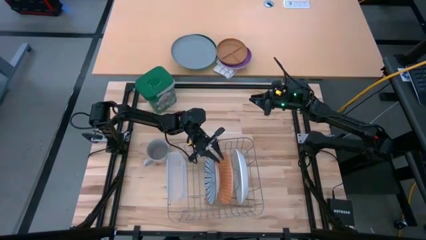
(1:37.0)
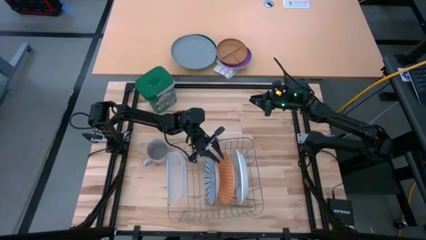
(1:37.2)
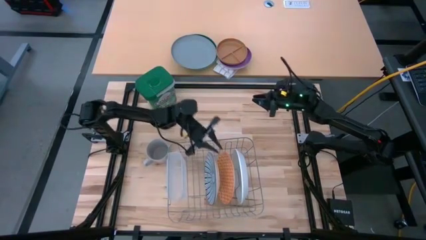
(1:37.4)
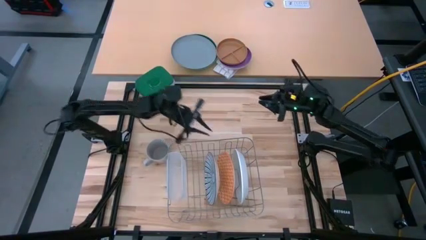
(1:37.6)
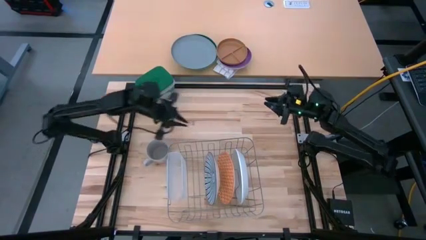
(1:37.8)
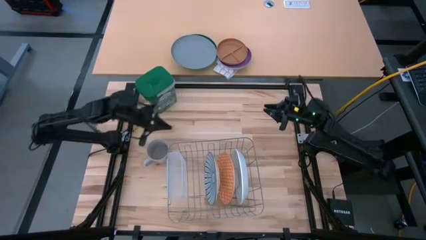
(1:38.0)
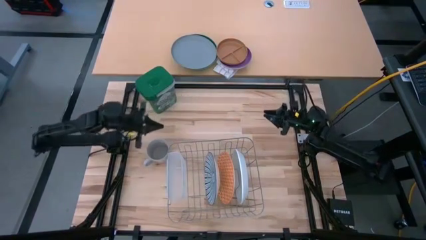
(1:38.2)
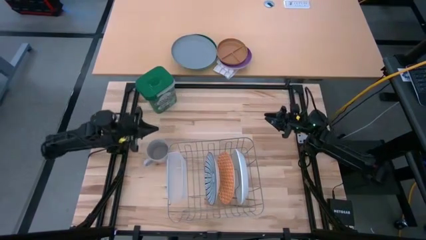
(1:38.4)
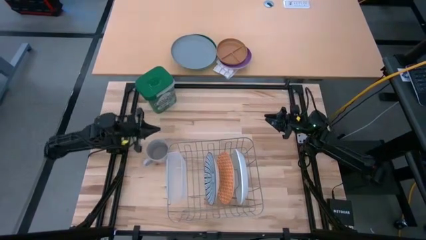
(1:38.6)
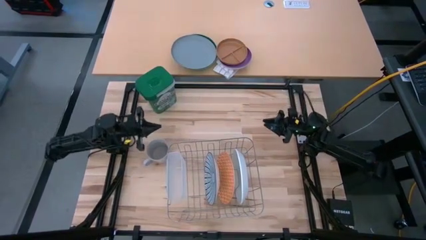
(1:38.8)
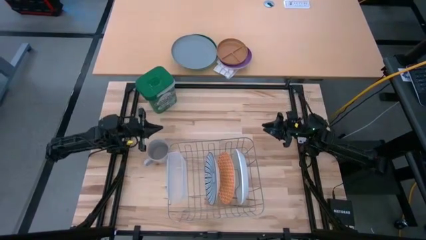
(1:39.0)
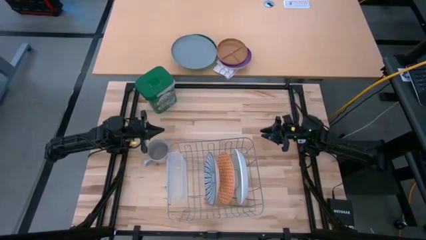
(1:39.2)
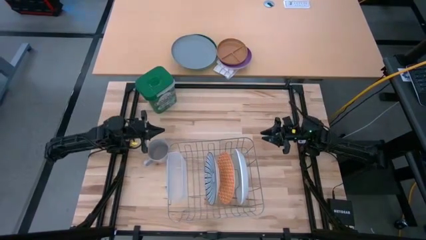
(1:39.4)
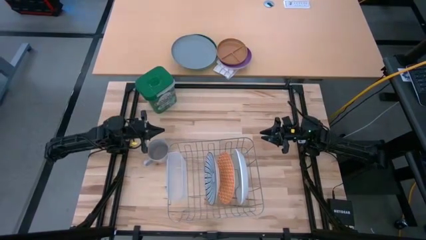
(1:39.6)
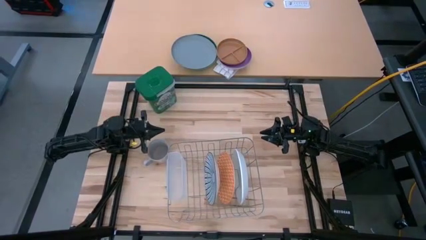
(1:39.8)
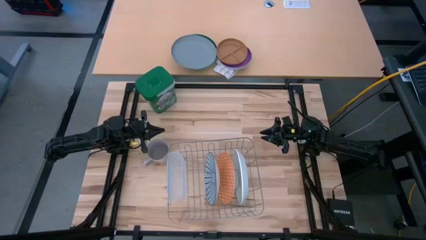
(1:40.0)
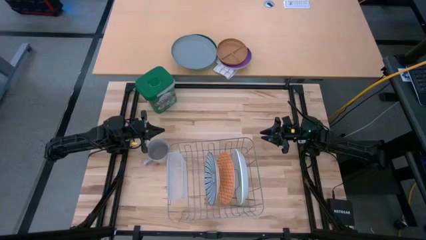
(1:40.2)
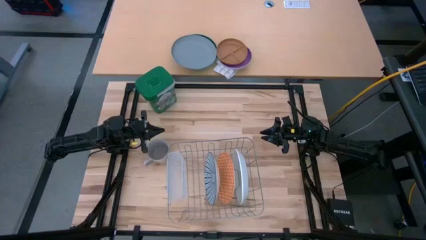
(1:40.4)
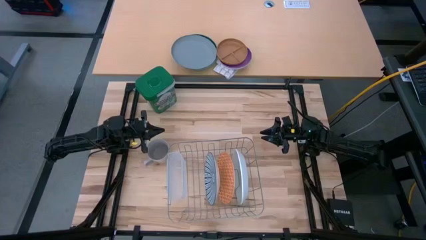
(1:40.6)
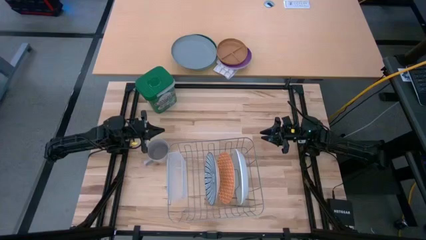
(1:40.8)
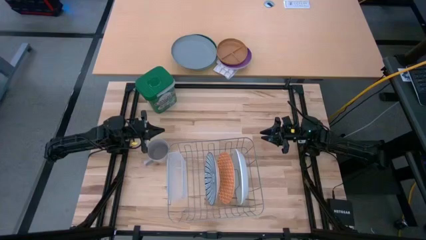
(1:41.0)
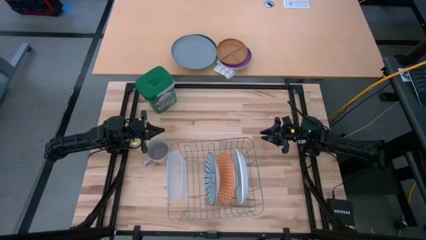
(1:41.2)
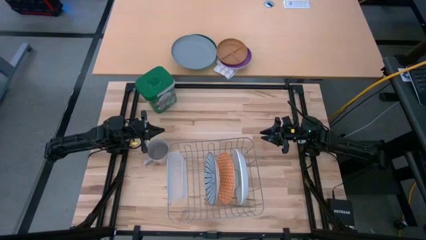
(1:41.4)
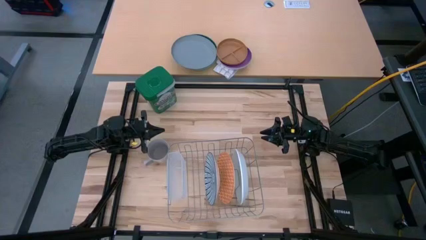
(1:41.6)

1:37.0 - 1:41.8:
Task: Sort dishes
Return to Home Position

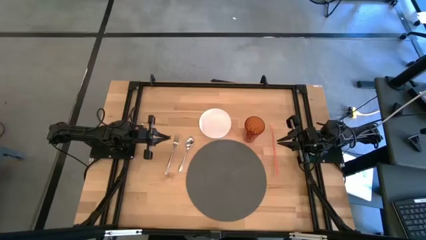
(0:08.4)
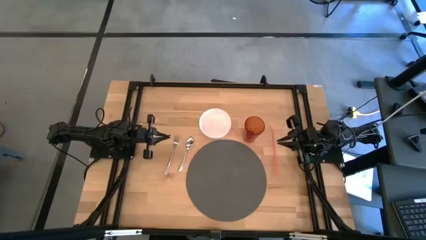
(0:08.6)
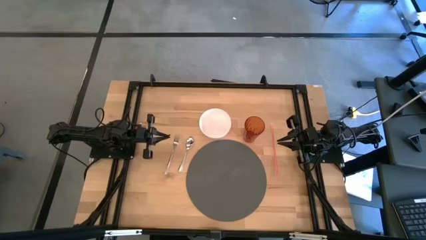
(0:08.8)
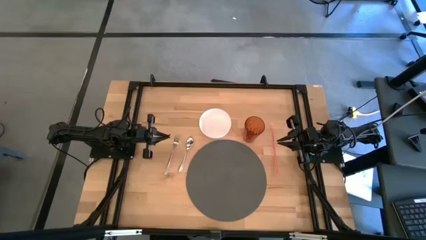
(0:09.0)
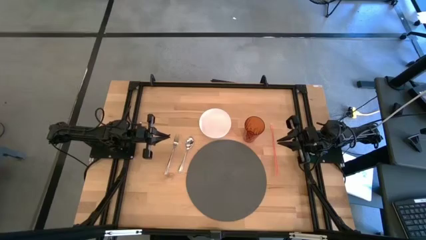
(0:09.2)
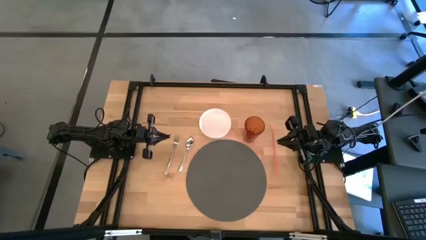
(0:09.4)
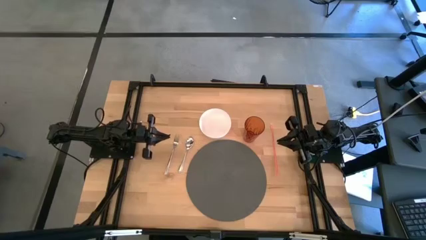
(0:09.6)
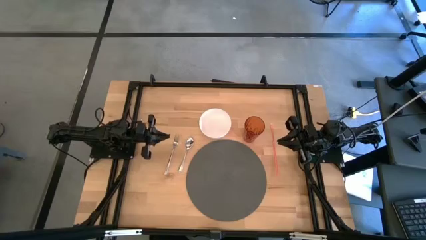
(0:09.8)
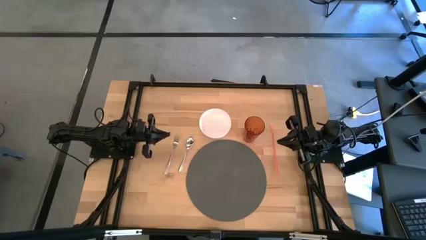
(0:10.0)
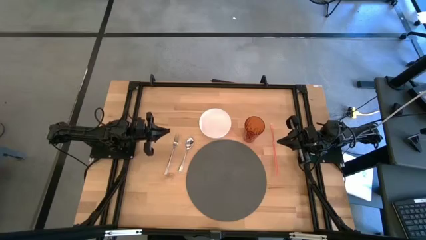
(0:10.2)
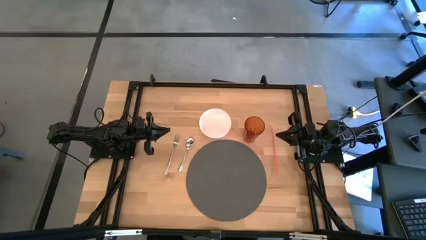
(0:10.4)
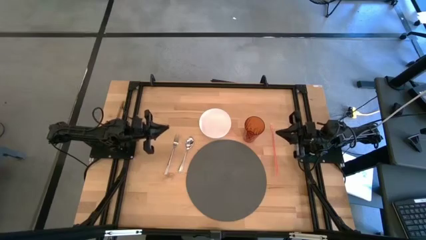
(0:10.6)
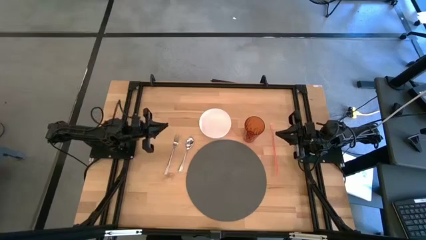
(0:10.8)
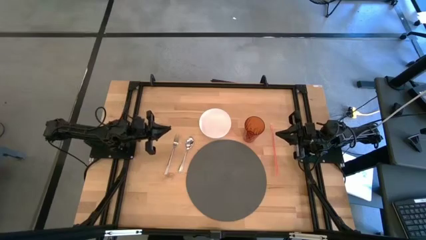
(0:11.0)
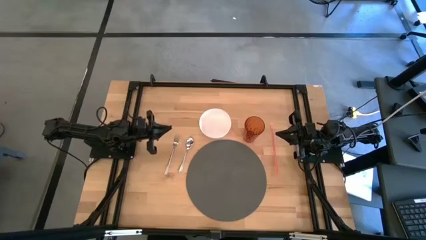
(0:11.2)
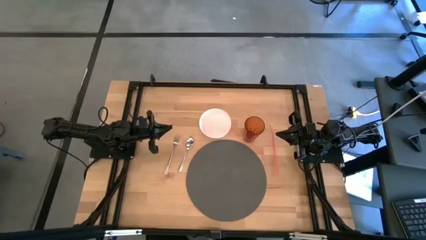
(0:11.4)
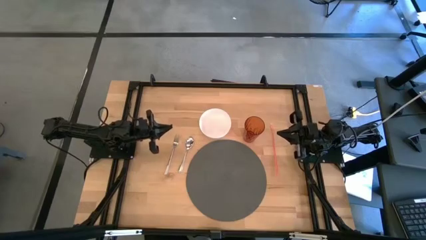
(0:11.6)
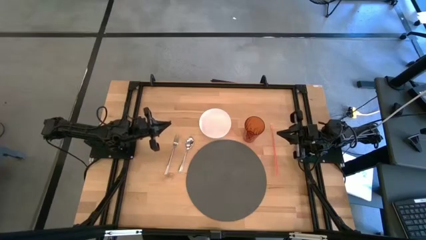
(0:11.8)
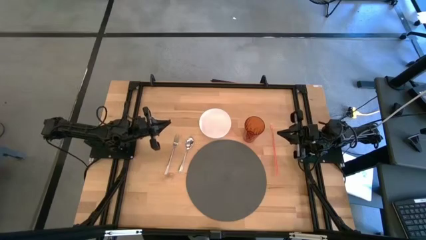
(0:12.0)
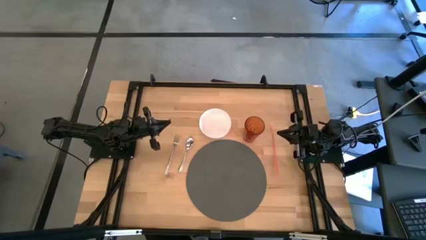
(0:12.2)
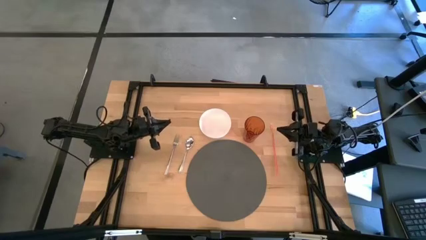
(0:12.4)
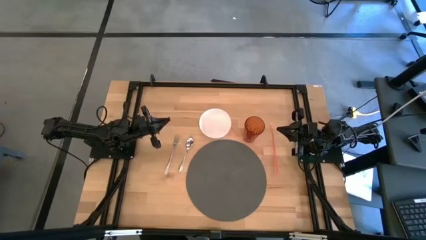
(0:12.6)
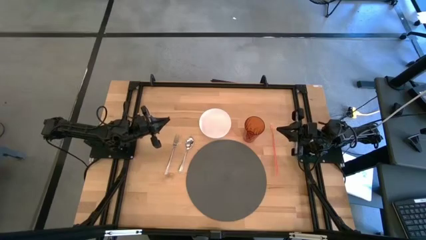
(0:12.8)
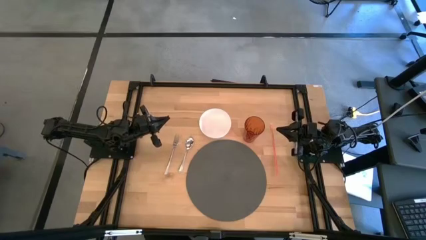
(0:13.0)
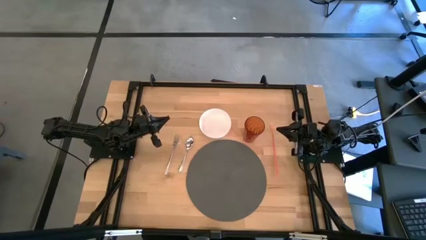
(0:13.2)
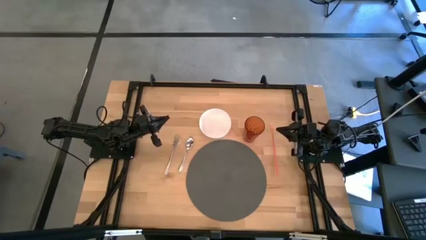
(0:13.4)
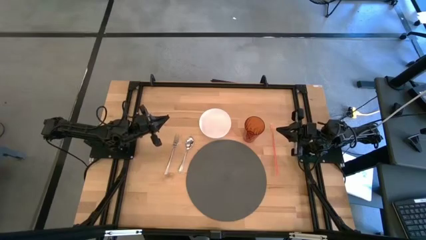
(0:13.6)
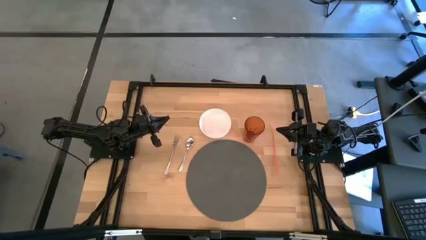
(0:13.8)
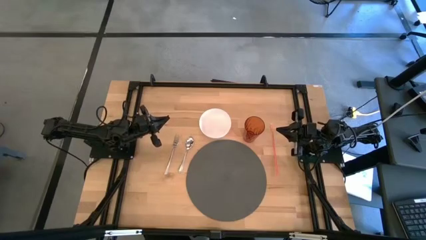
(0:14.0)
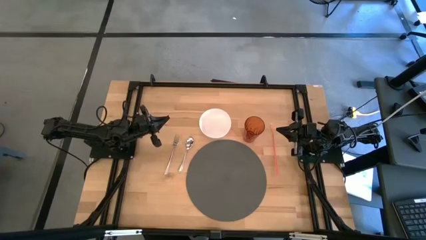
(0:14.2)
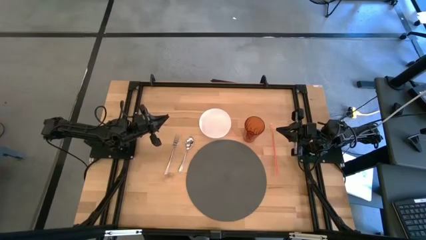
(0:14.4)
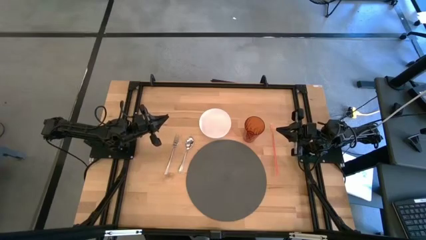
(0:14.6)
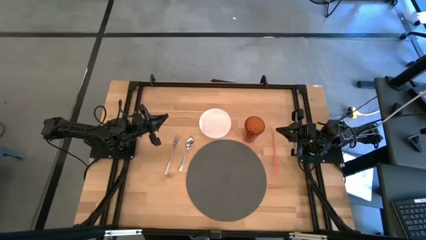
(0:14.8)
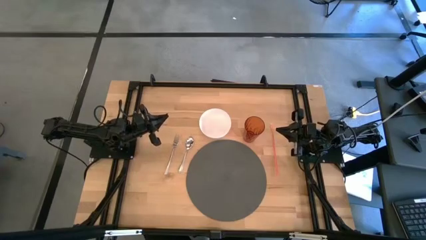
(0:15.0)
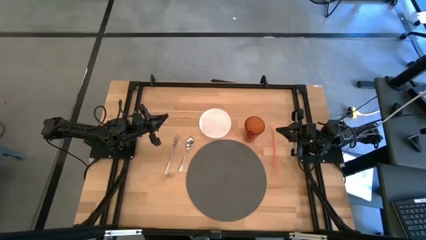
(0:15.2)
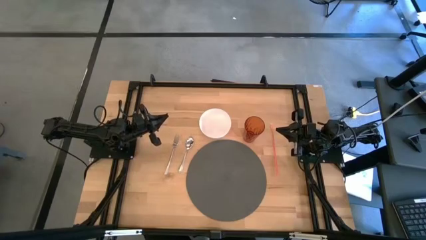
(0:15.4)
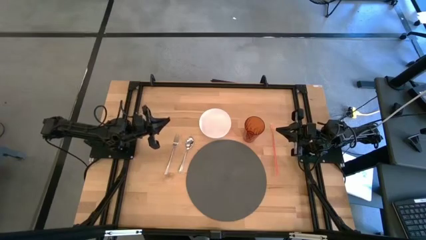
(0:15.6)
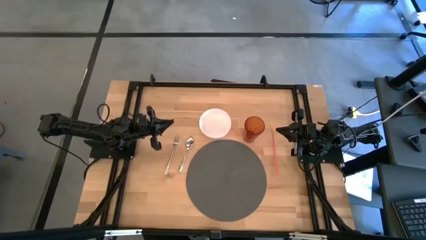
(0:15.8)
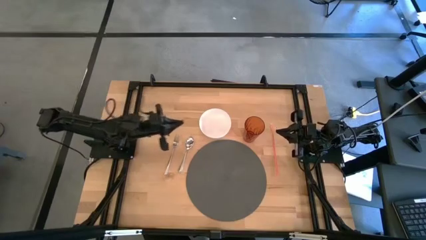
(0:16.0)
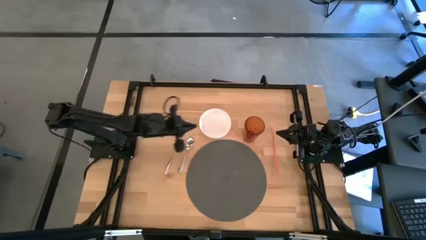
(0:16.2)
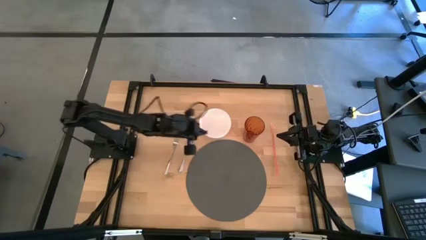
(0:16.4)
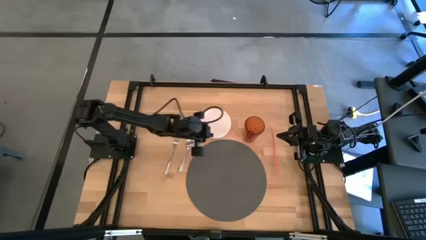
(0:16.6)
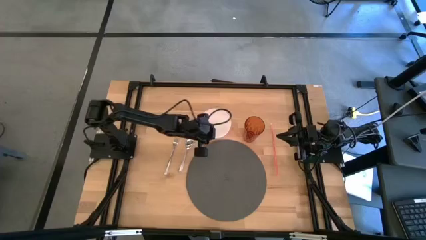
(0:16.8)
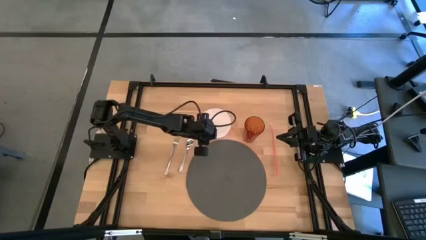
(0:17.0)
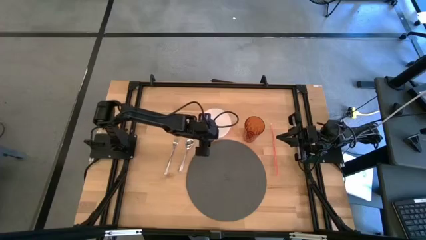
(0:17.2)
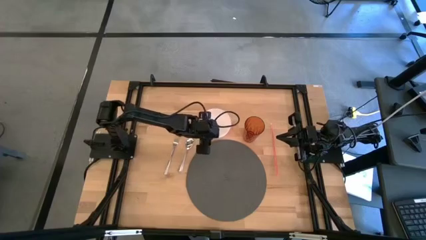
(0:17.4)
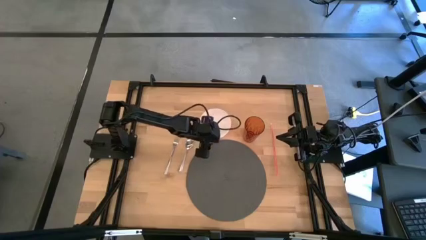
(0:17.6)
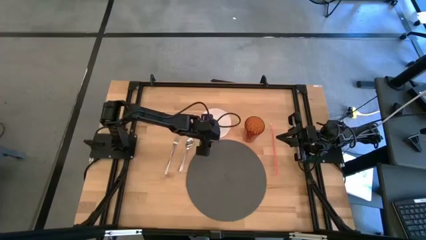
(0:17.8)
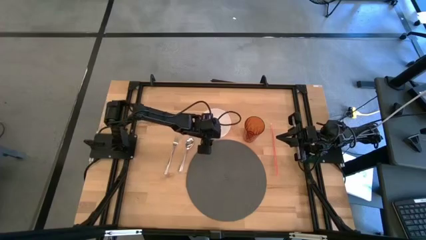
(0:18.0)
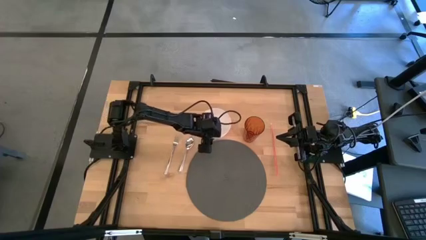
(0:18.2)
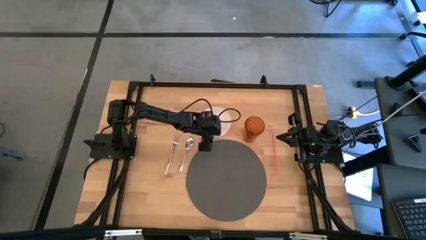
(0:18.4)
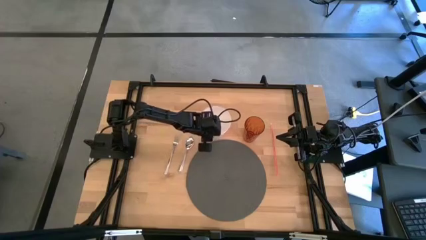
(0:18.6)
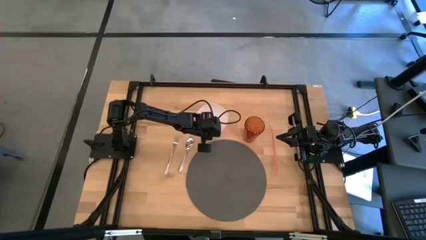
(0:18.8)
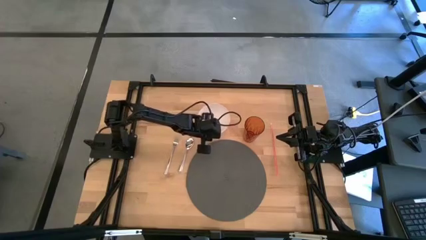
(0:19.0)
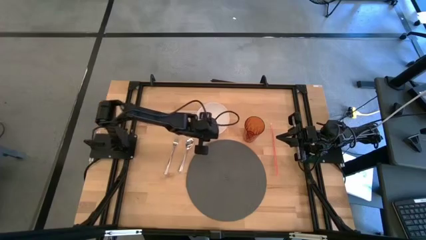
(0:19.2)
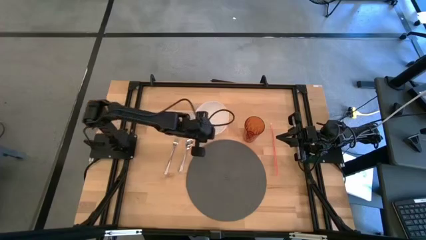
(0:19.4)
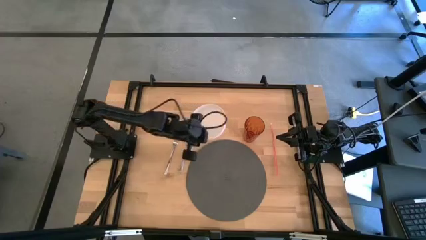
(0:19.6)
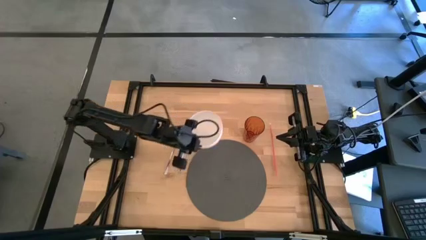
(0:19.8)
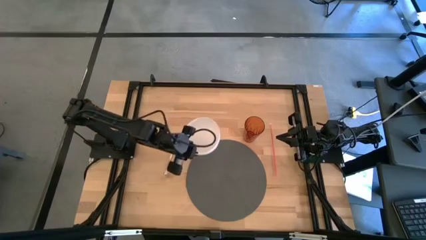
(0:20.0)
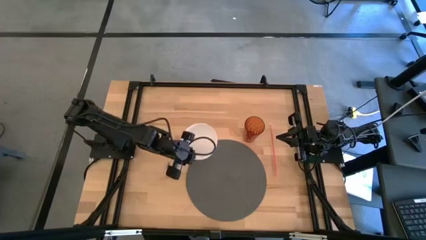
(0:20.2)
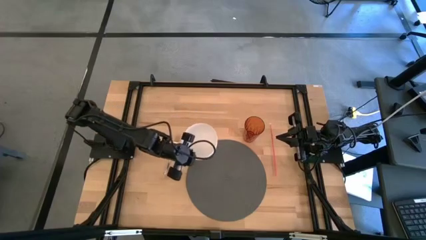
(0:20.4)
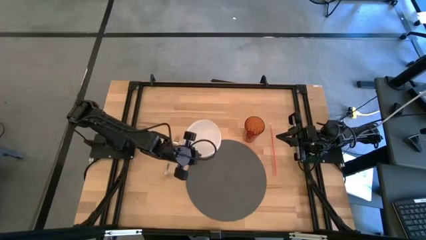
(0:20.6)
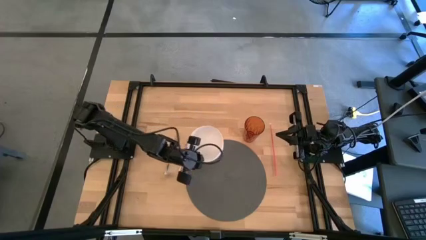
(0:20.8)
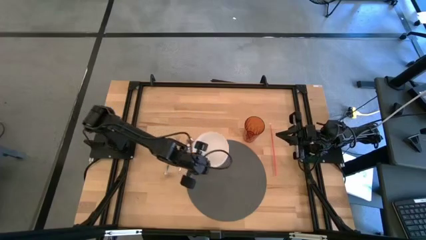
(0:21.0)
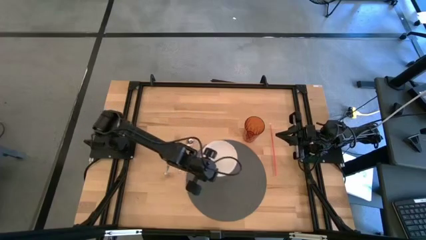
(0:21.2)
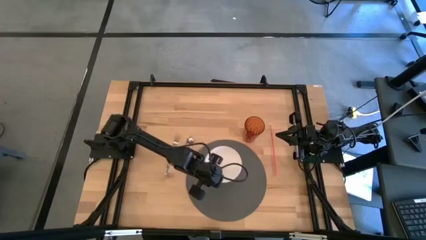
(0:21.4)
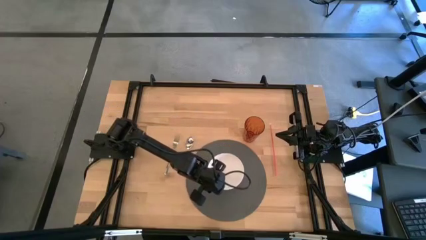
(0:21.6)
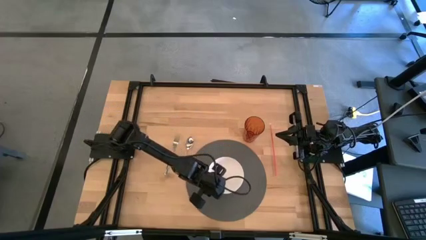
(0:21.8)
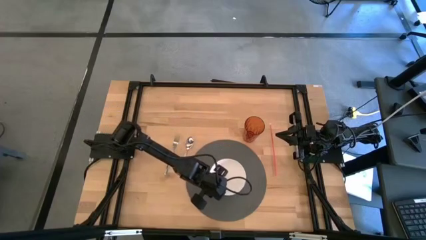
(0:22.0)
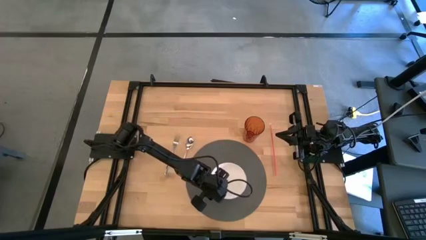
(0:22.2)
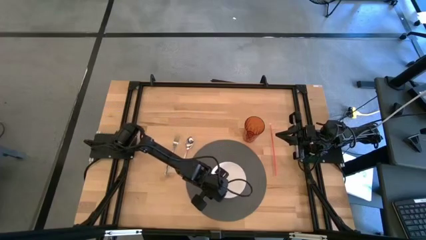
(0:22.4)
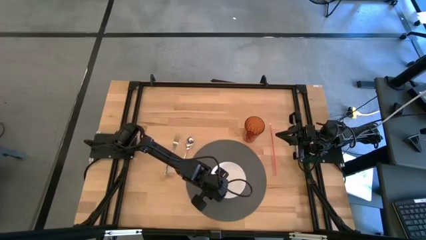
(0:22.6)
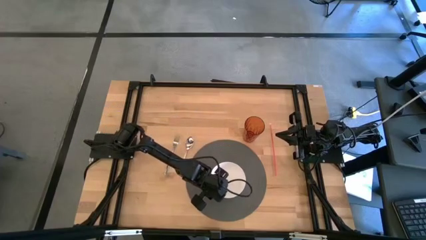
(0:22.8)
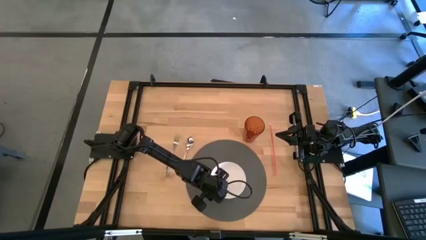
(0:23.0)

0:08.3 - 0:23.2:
Task: Pick & Place Utensil
Put the white bowl on the gray mat
